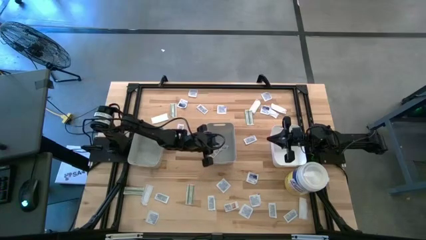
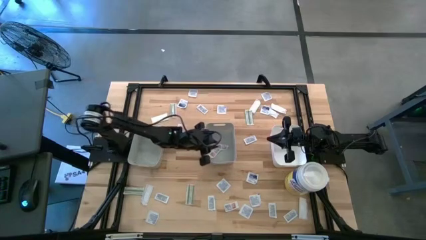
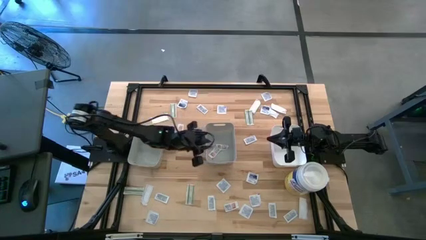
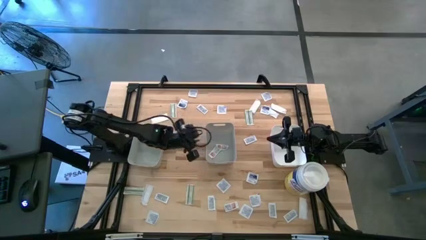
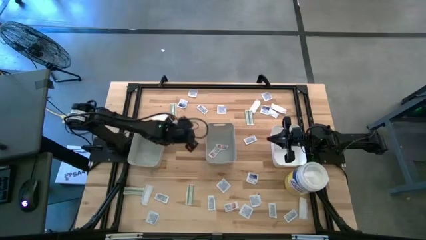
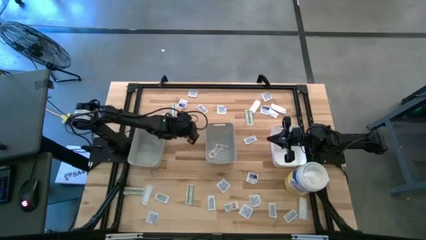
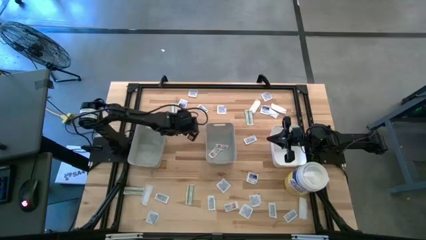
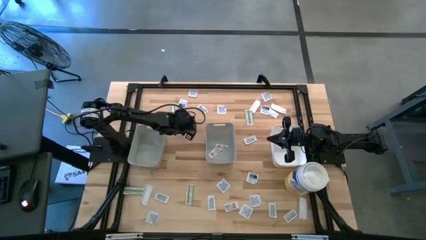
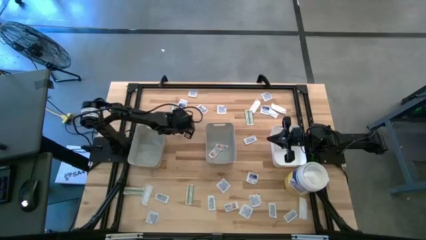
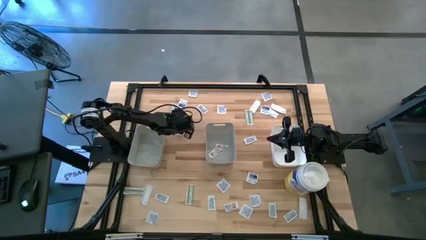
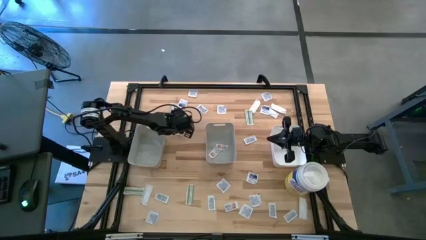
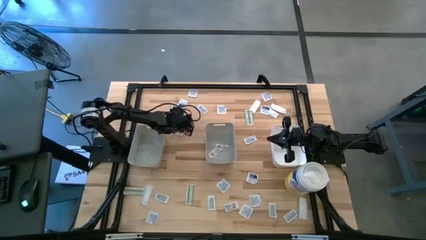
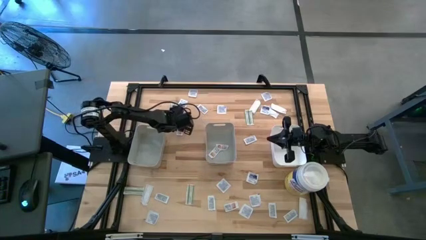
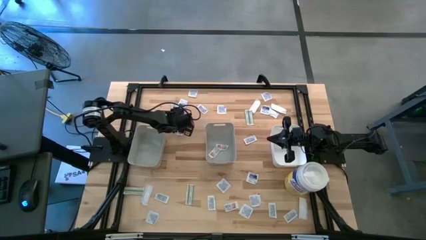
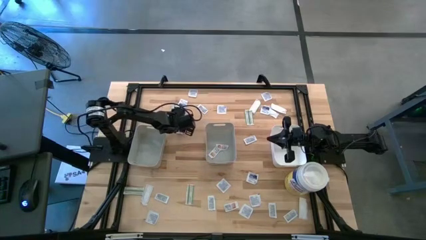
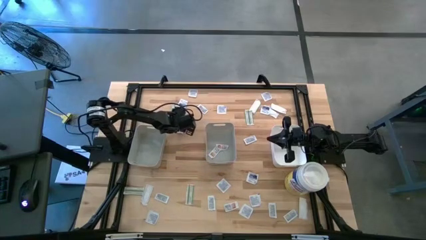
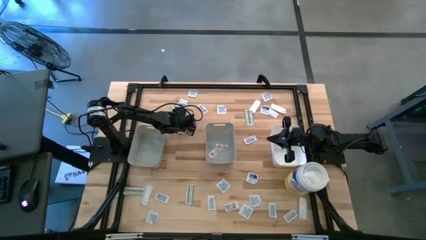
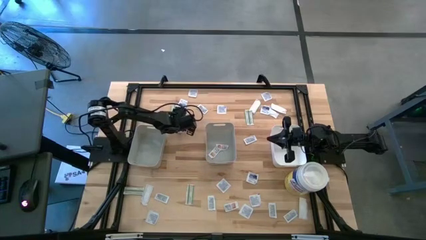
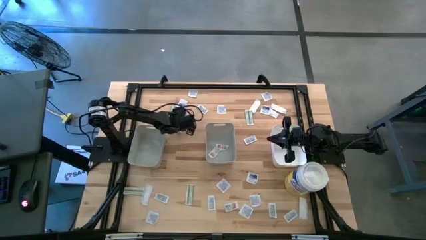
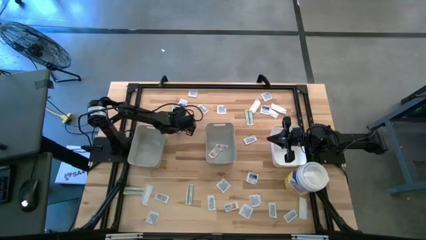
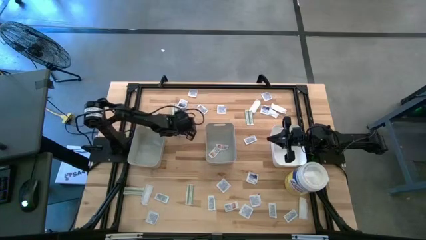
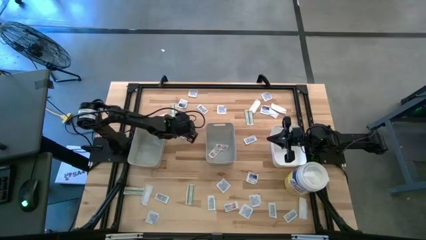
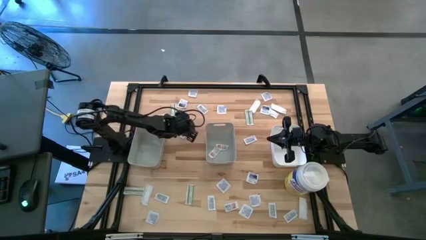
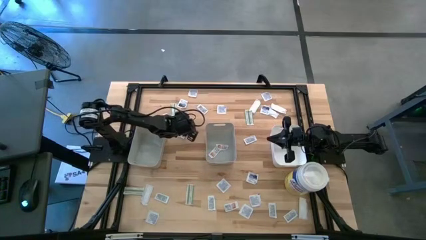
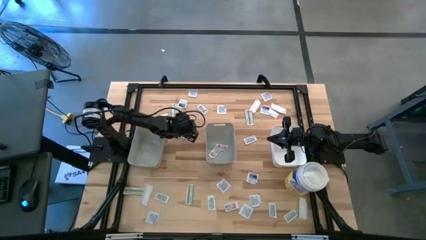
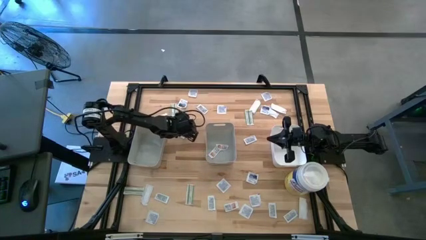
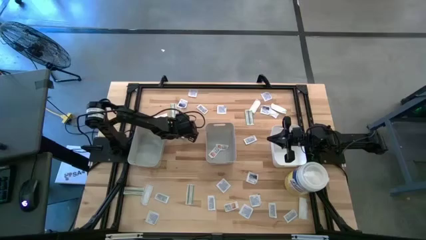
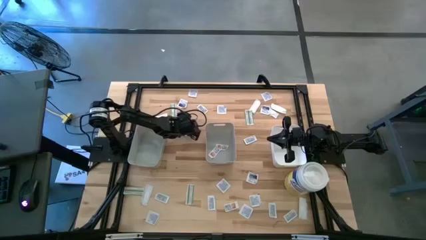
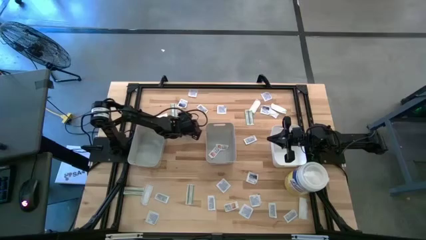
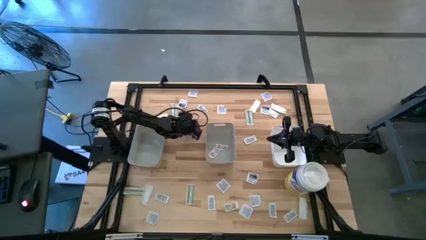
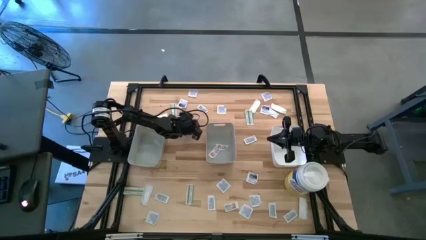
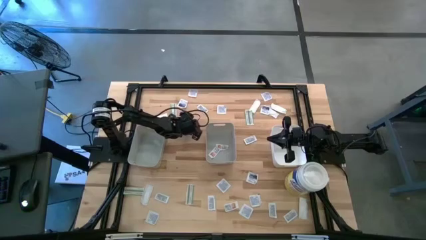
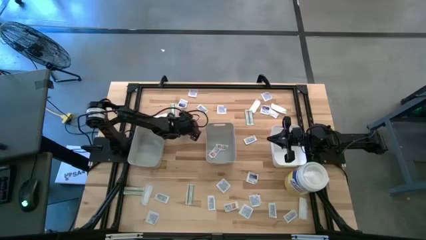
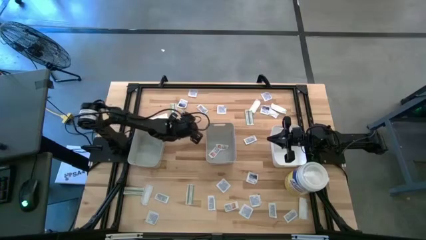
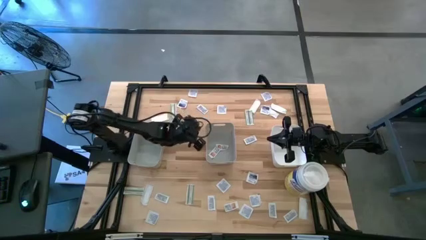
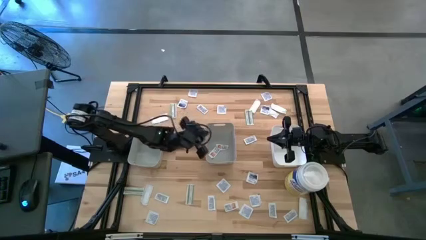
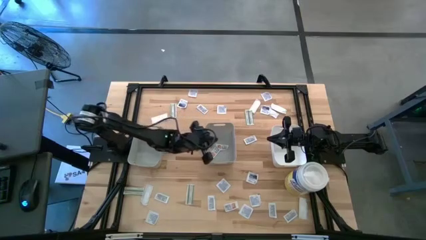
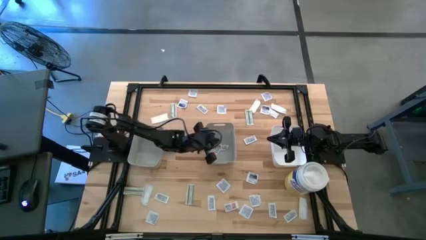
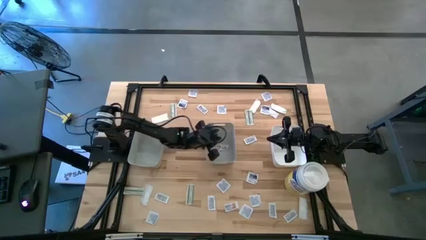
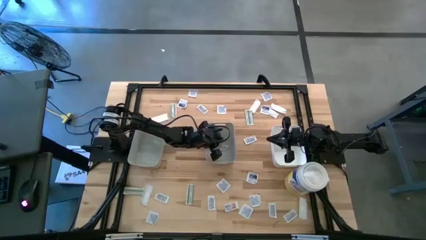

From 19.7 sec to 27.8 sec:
Task: Pick & Place First Aid Supplies
Put the ointment pack into the right gray bin

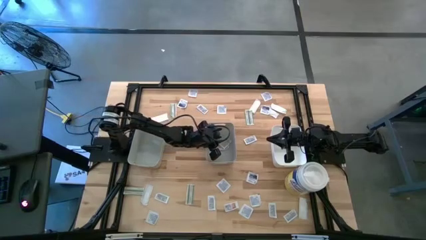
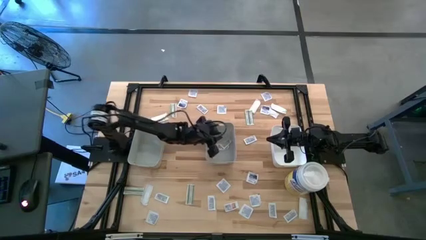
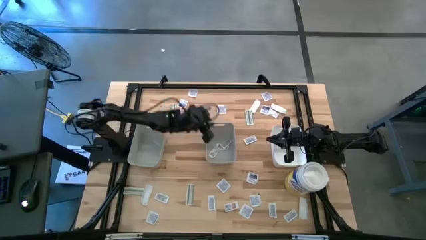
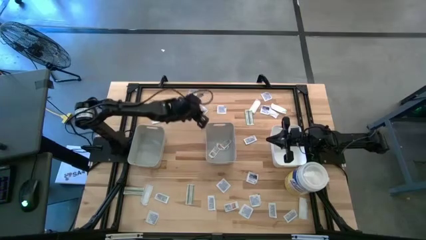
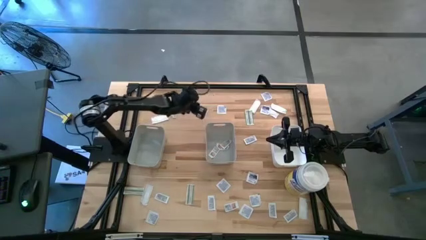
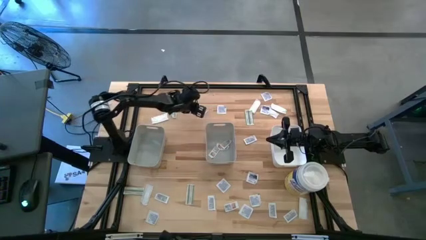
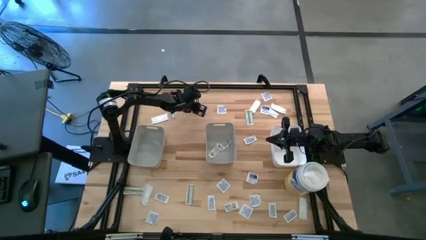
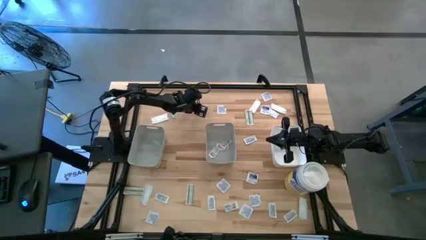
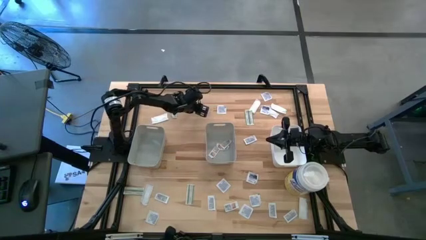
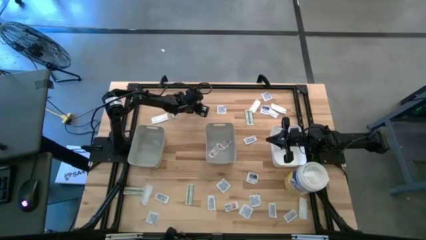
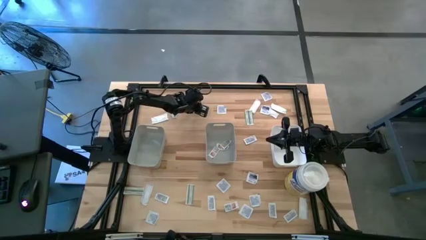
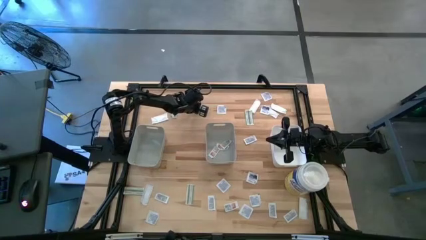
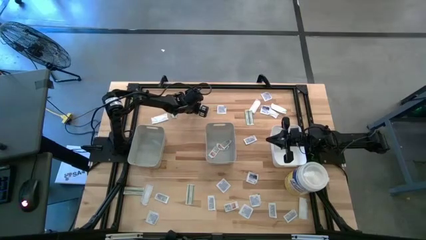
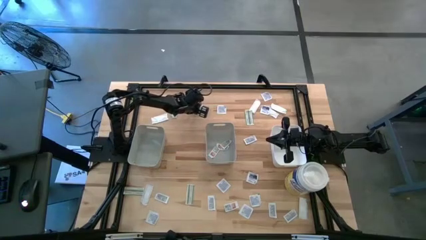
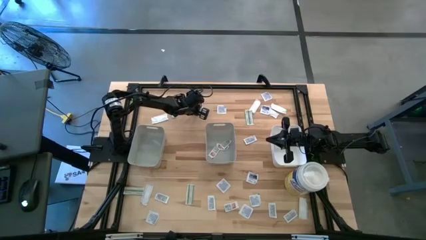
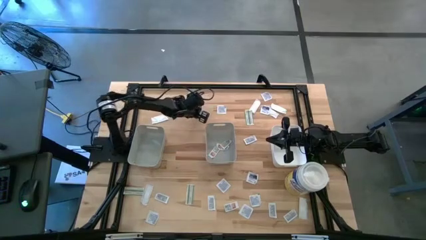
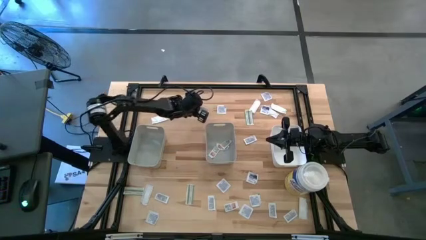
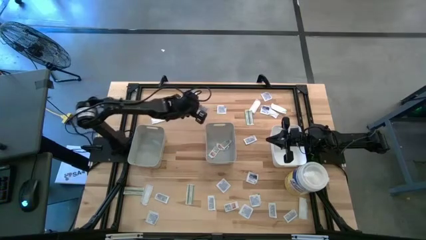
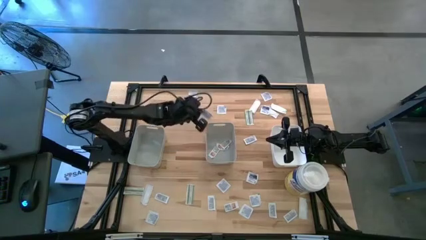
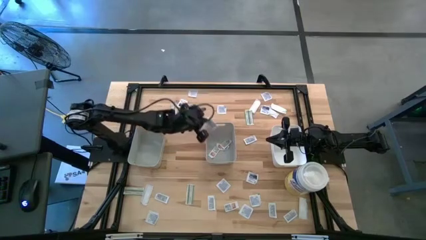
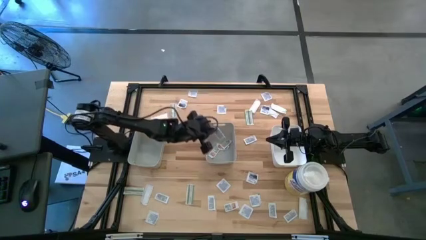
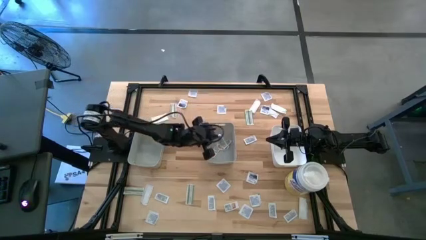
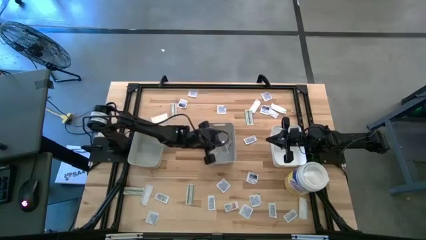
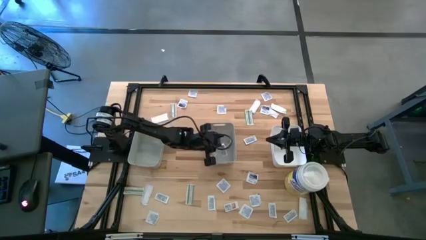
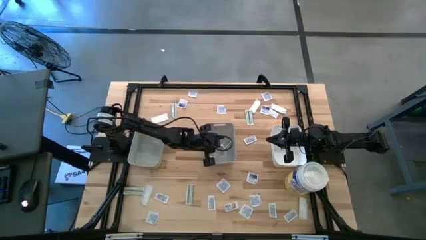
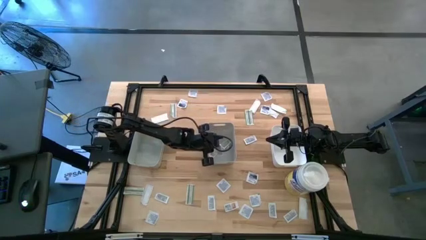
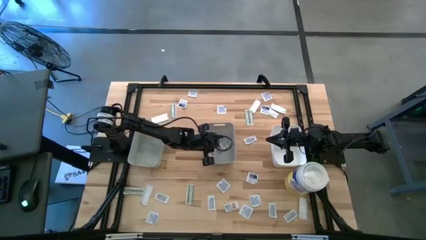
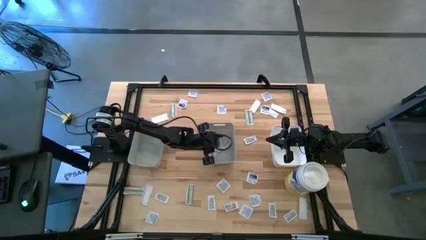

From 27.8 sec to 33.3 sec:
Put the ointment pack into the right gray bin

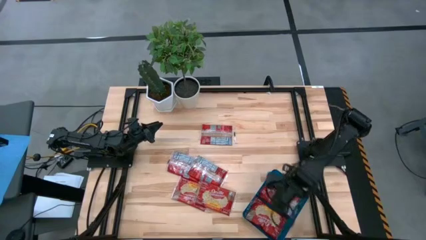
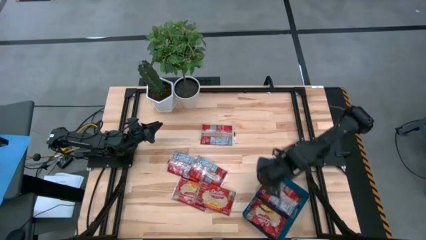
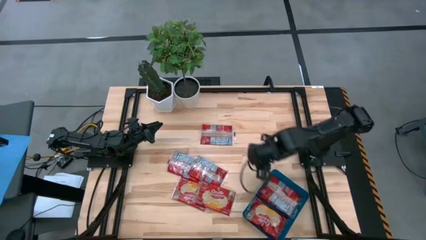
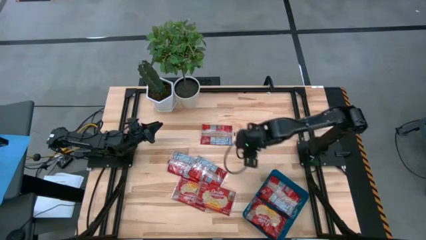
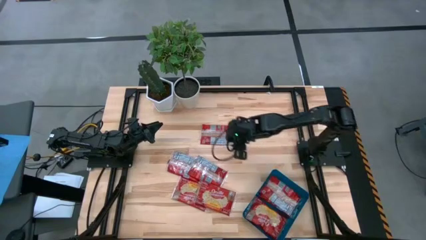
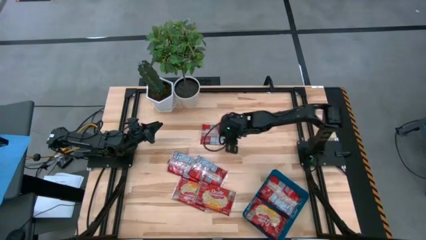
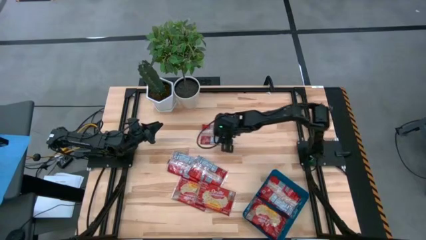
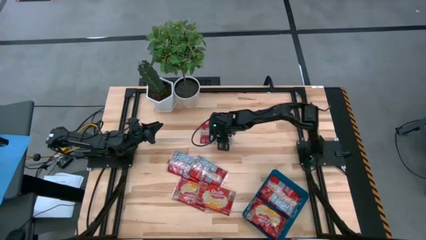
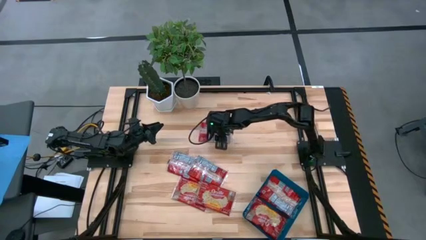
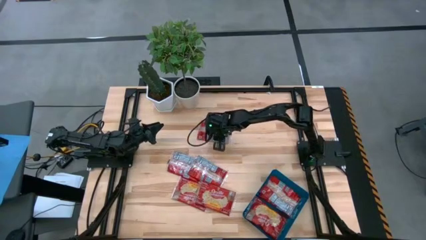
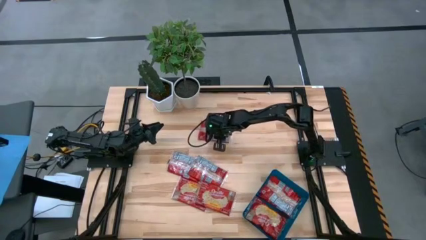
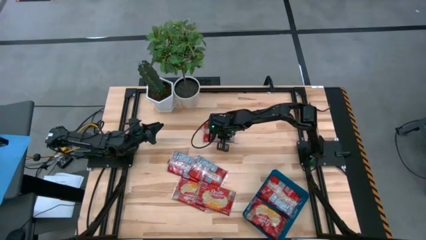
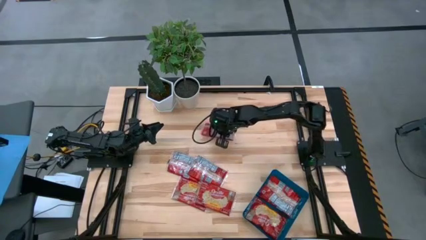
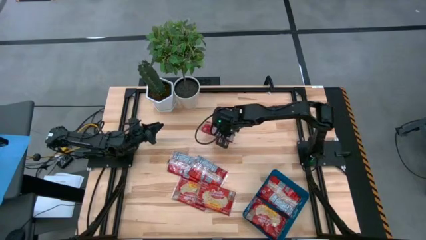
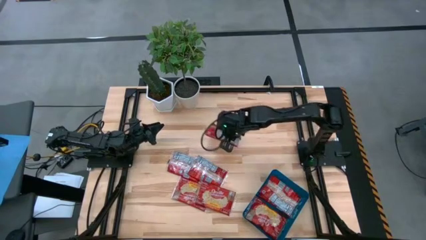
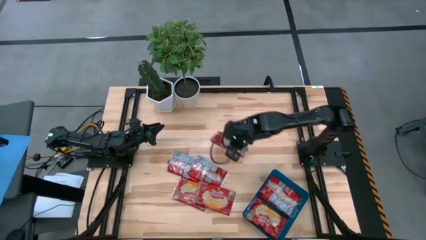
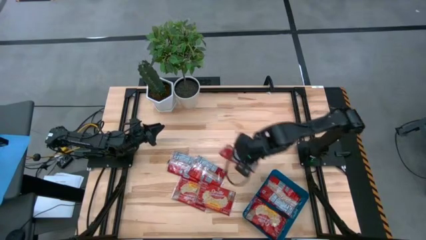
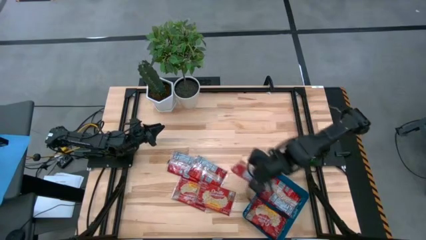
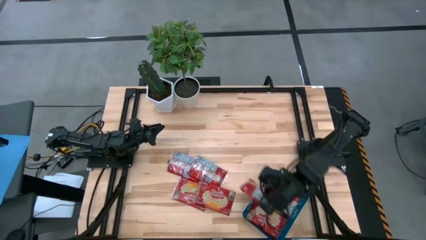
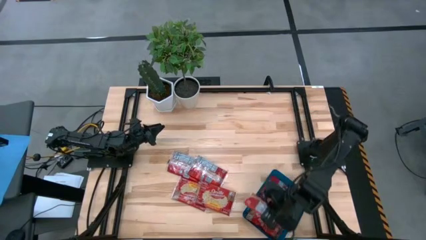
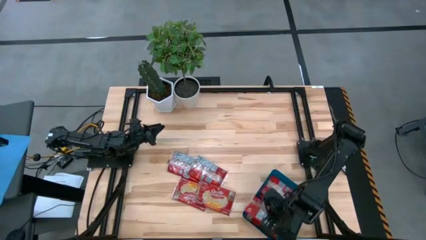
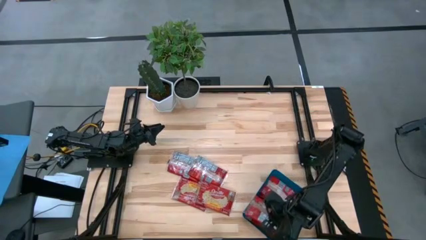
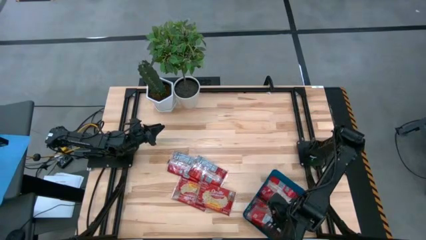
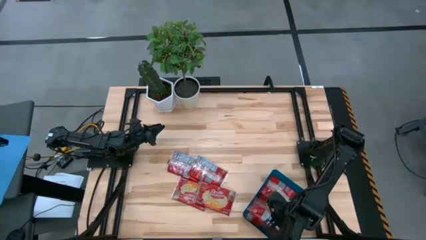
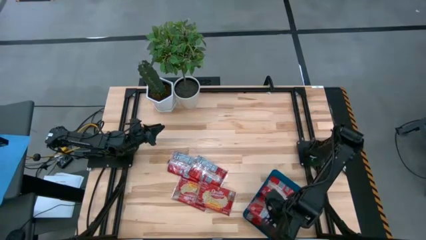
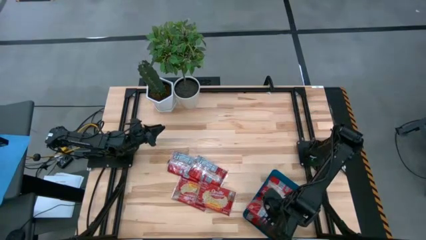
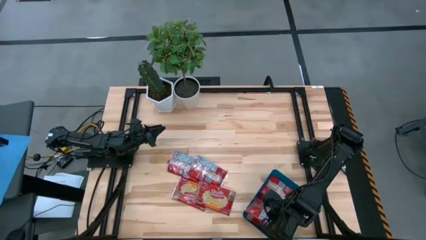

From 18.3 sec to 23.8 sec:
Task: Sort popcorn bags into baskets
Put the red popcorn bag into the blue bin
